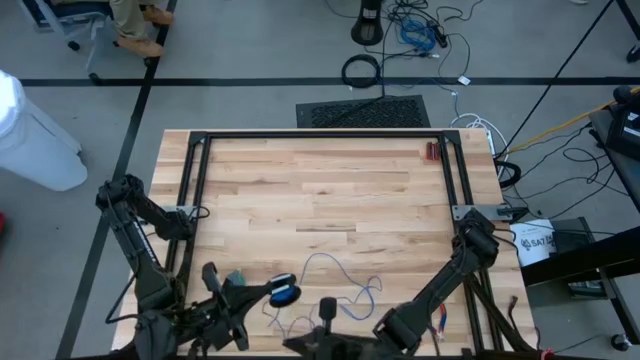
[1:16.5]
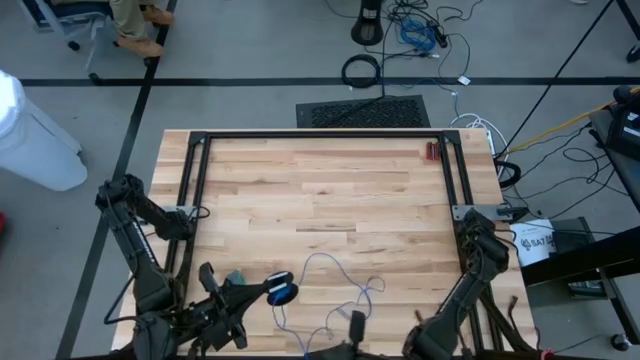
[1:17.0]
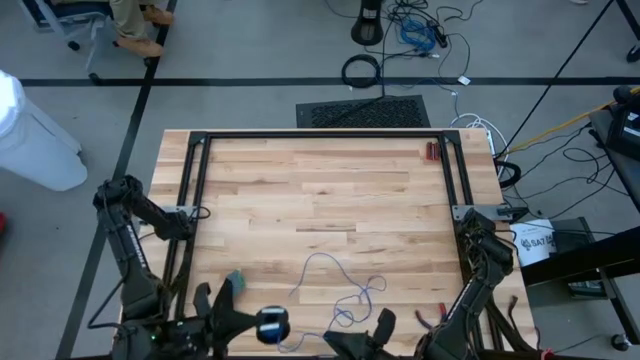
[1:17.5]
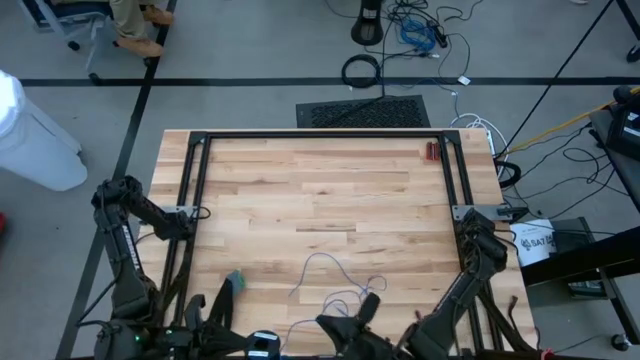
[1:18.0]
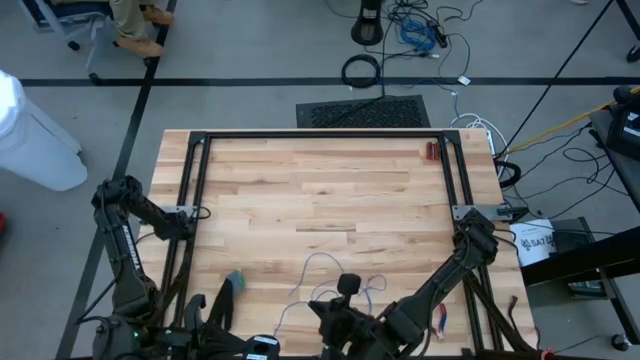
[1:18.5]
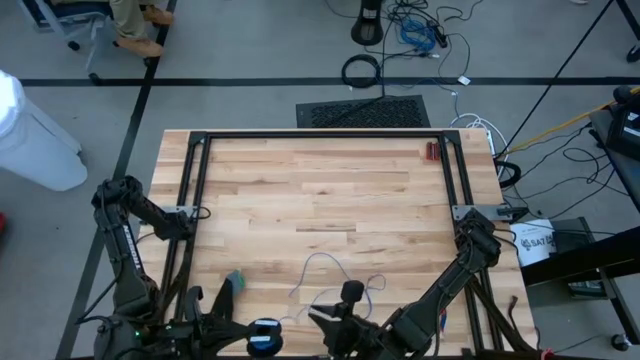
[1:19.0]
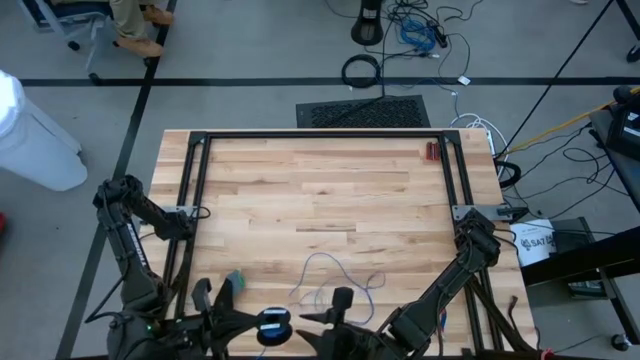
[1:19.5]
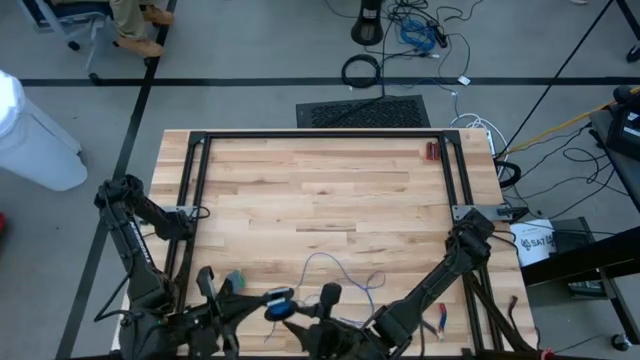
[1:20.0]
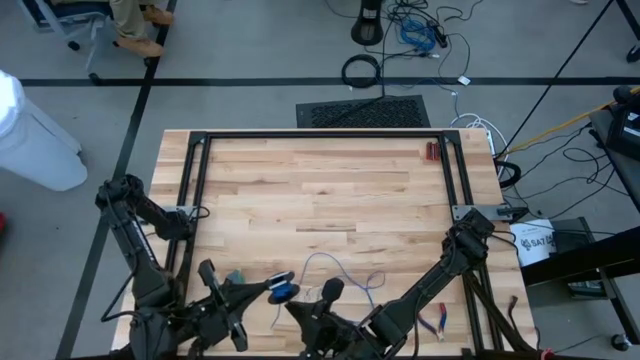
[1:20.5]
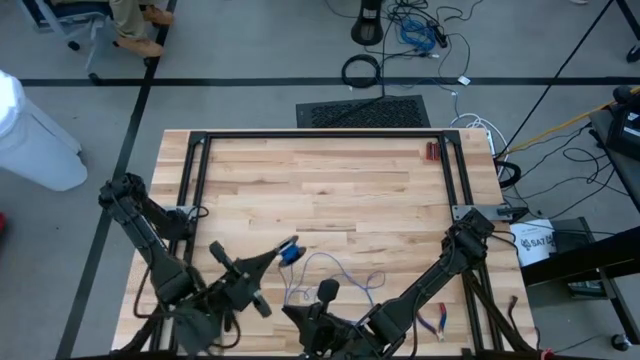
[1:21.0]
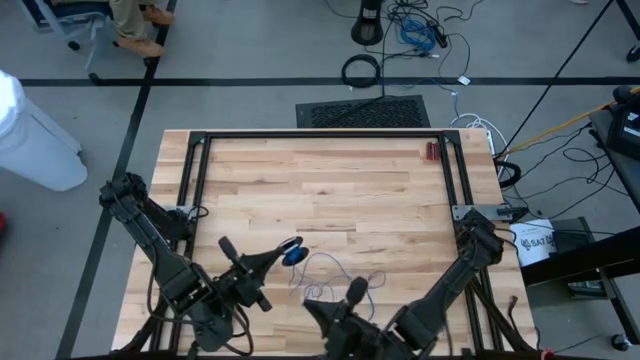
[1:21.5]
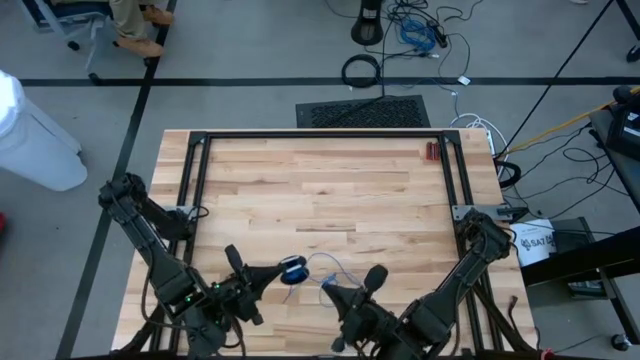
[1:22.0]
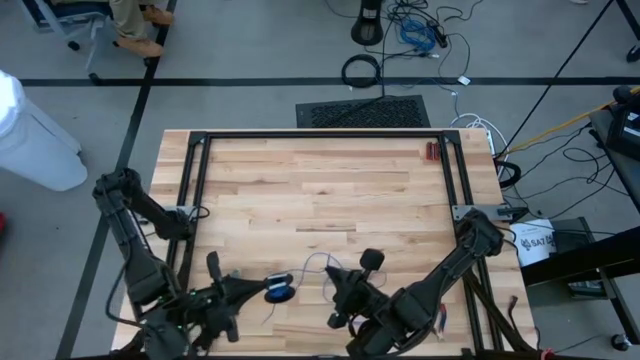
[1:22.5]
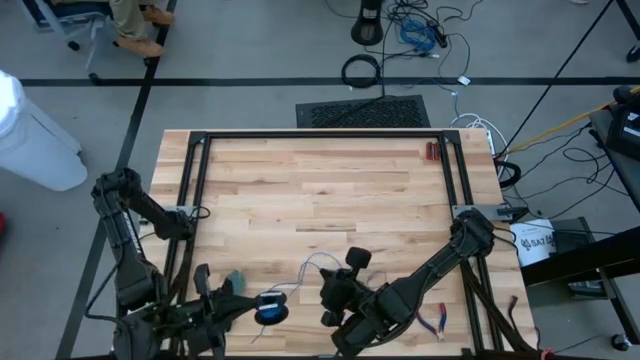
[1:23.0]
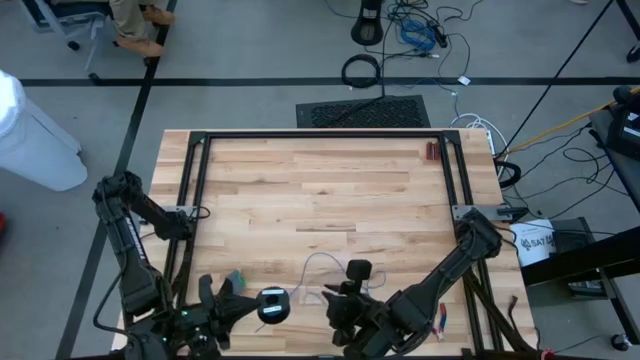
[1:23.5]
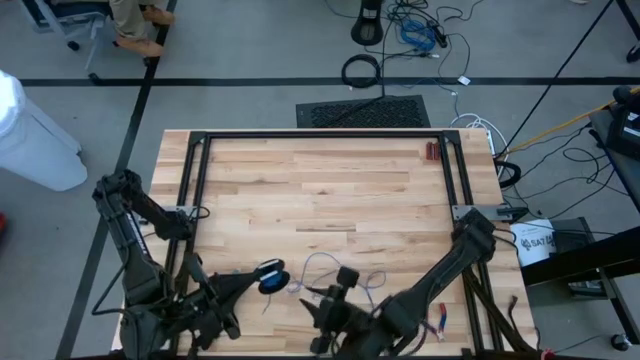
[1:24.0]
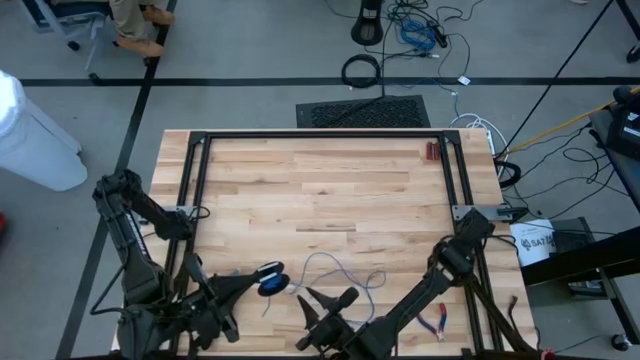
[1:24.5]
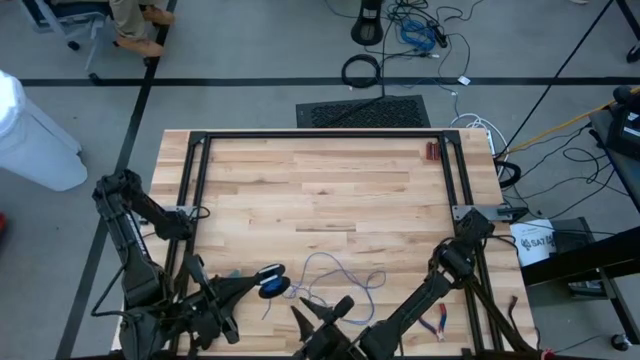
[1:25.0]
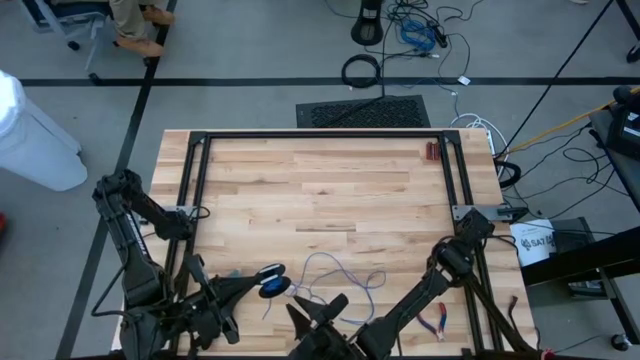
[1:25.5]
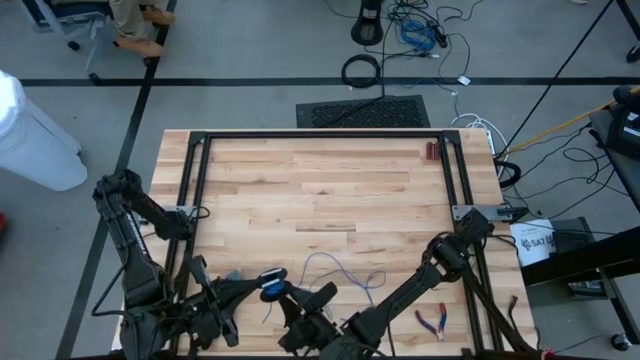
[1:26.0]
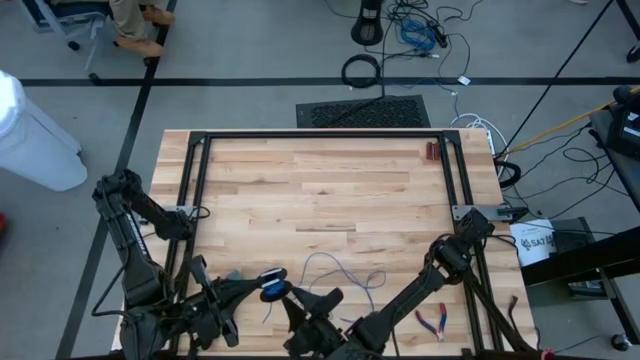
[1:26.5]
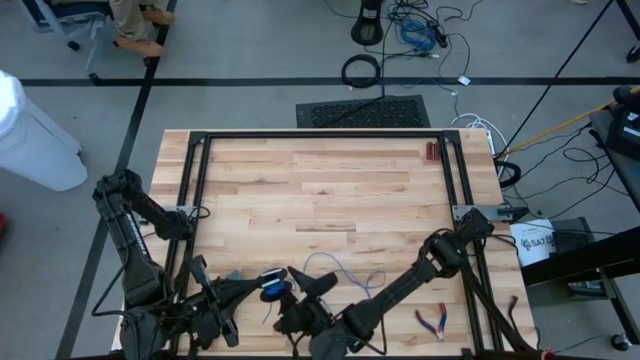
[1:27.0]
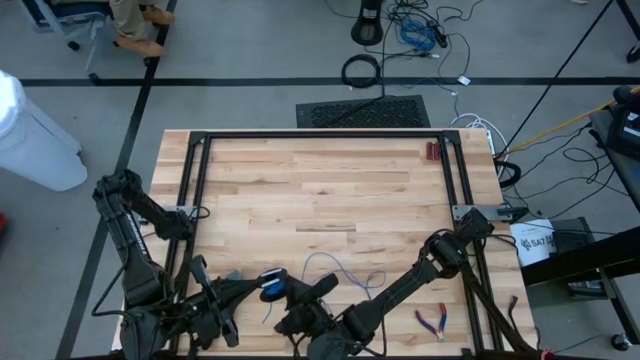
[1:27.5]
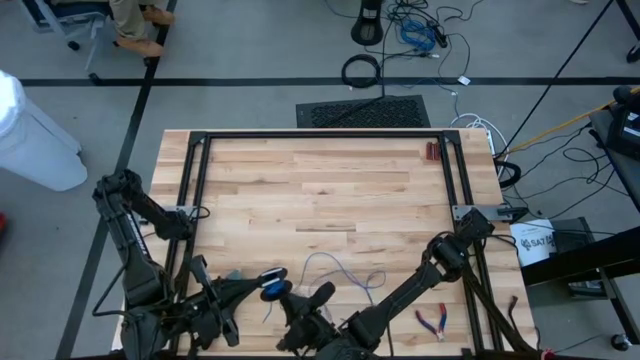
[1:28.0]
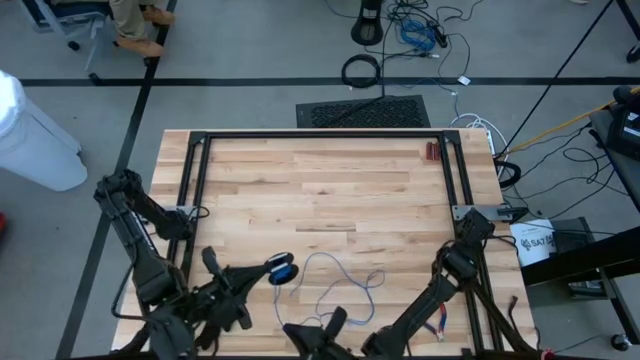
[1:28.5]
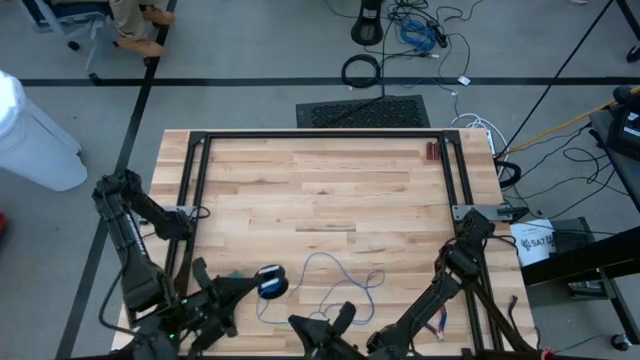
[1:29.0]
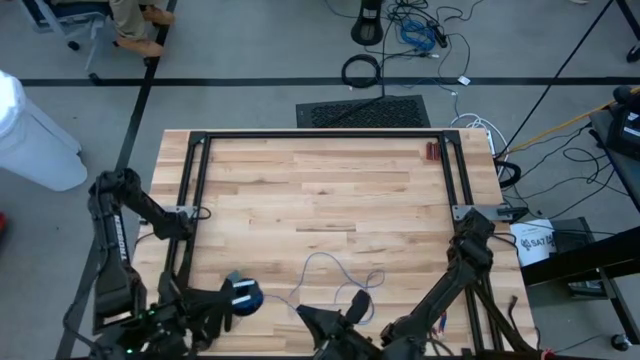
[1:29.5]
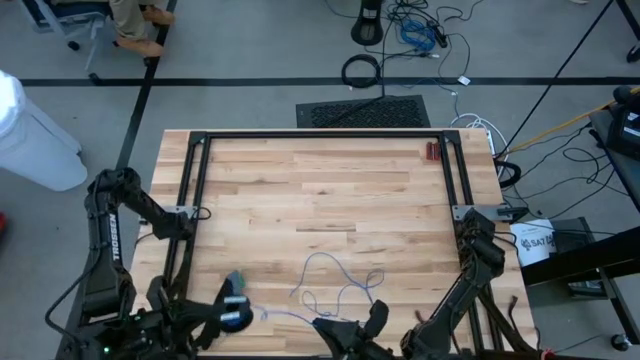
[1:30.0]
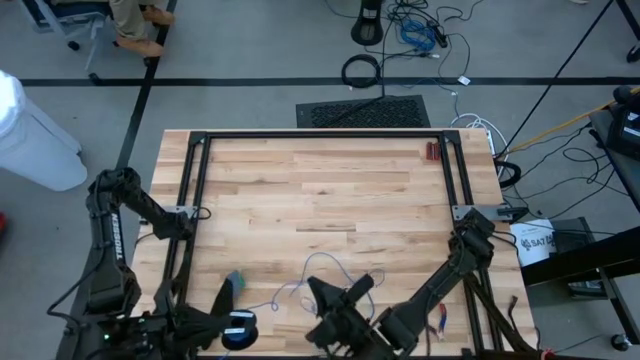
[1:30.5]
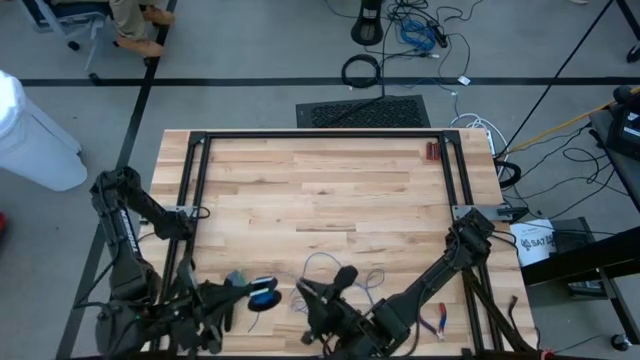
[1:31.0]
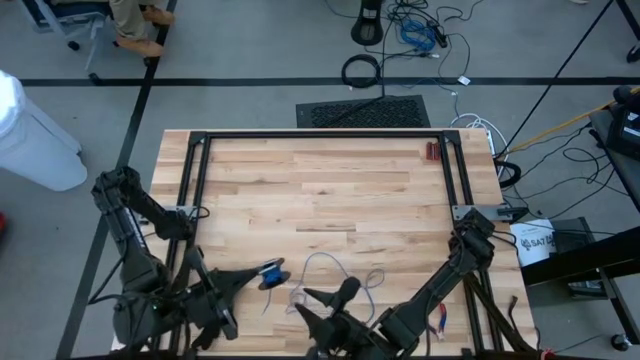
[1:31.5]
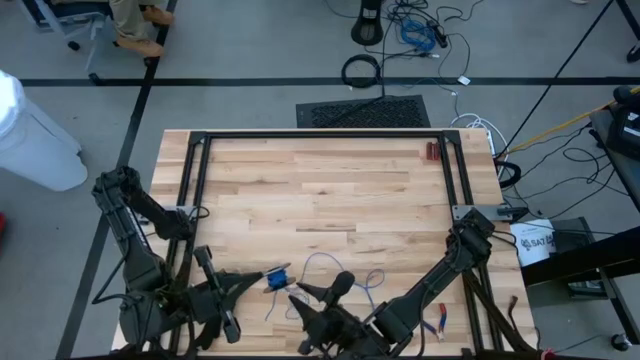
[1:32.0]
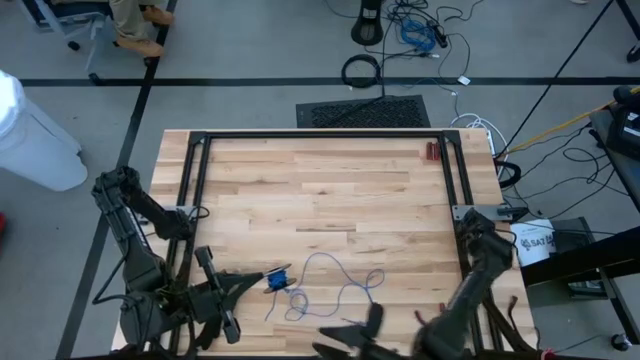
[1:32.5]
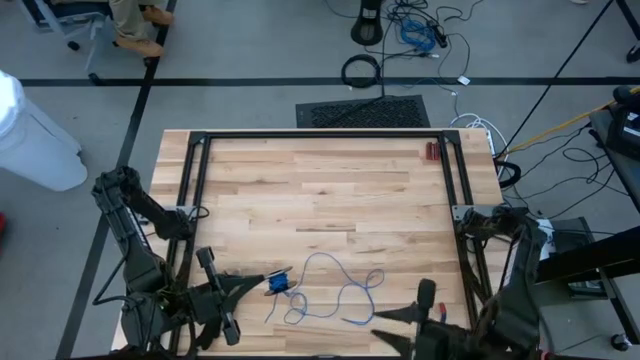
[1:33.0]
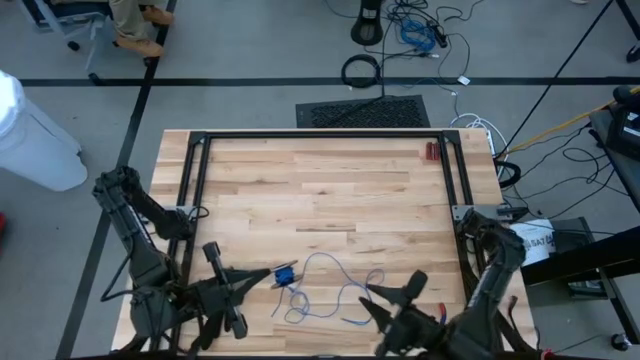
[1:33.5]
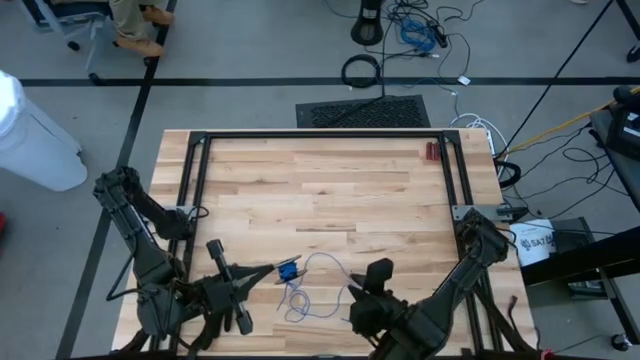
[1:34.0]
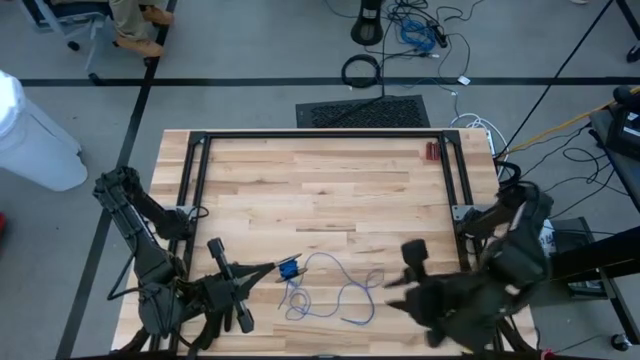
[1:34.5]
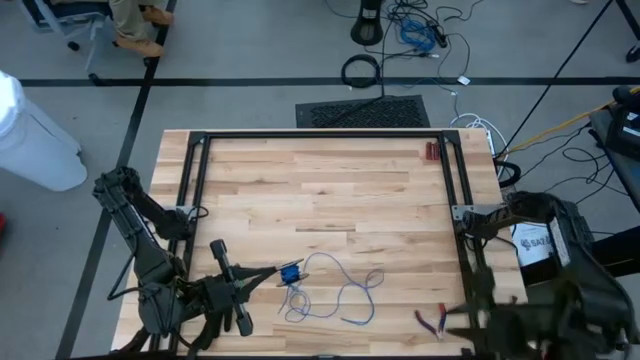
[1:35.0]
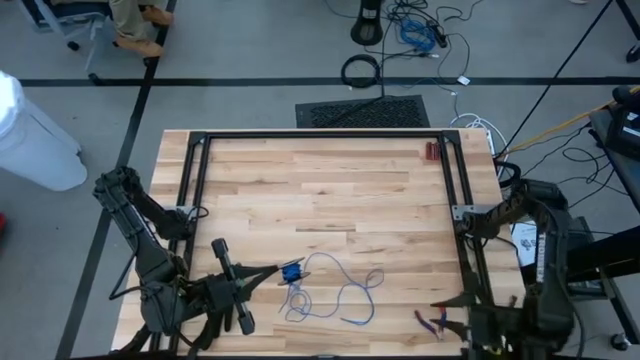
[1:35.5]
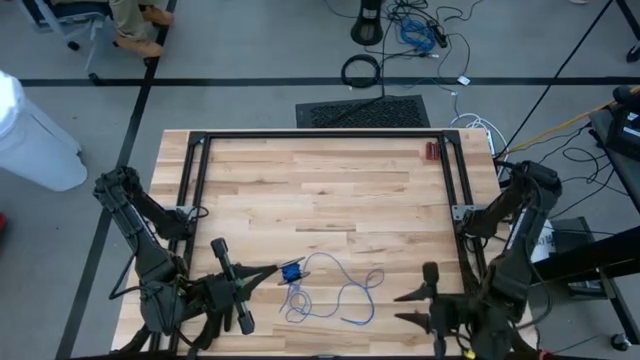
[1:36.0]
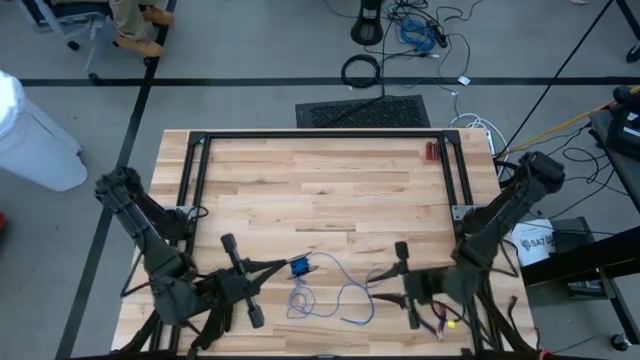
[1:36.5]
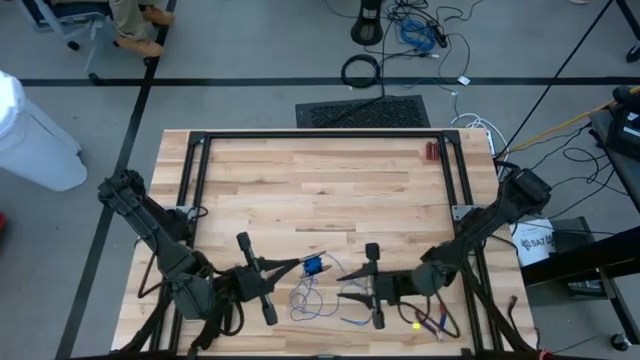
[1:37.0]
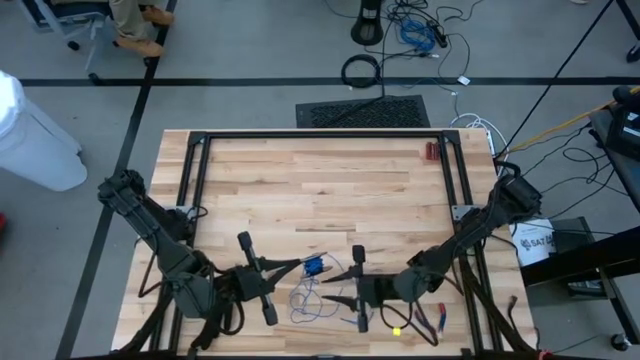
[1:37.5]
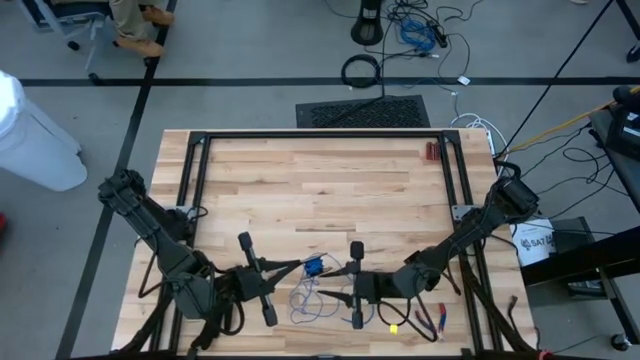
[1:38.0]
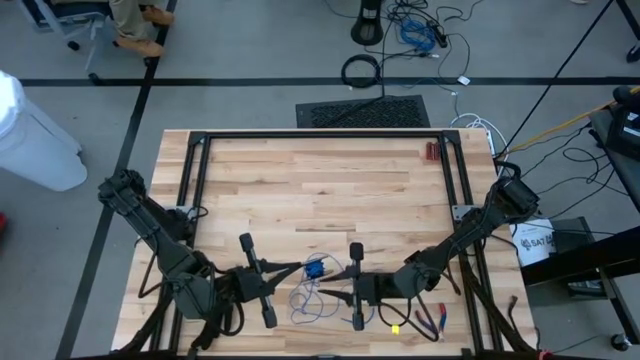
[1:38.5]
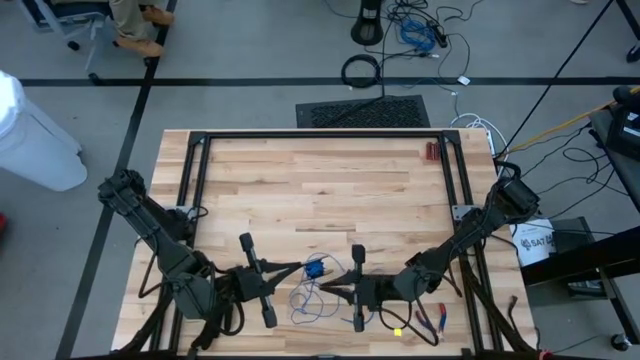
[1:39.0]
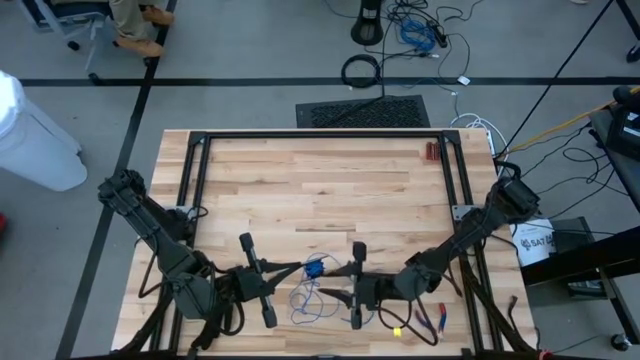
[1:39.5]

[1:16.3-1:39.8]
Task: Coil cords
Uncoil the blue wire from the black spool
